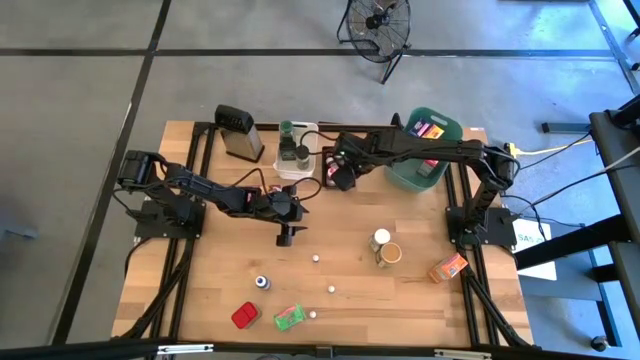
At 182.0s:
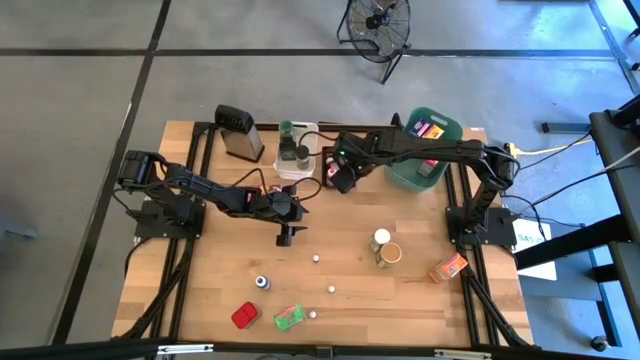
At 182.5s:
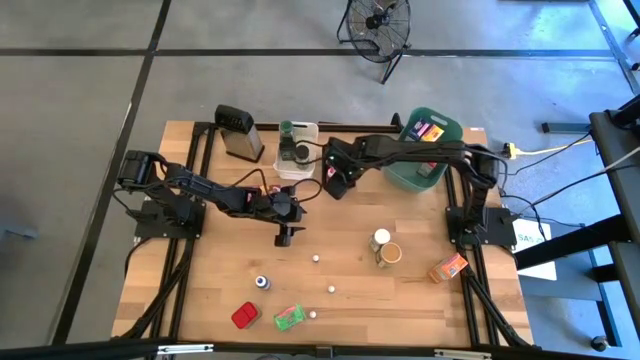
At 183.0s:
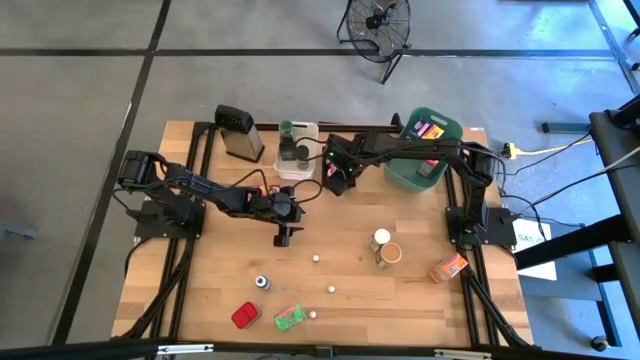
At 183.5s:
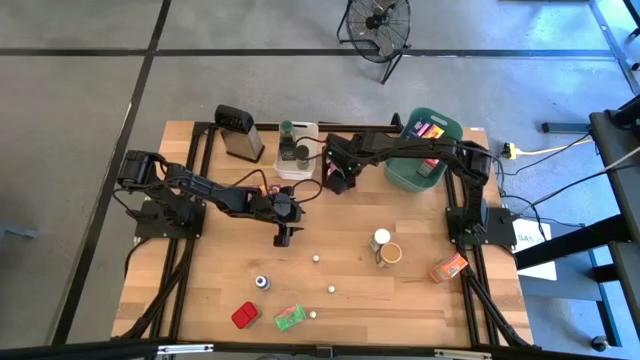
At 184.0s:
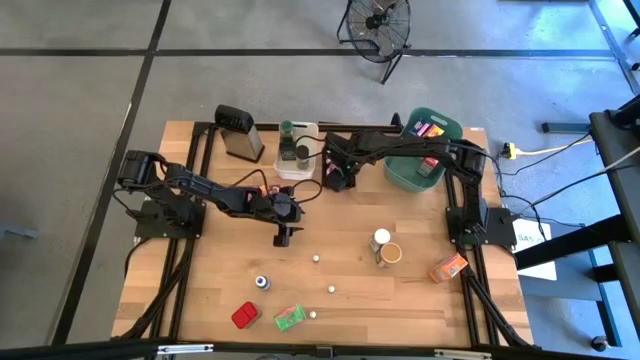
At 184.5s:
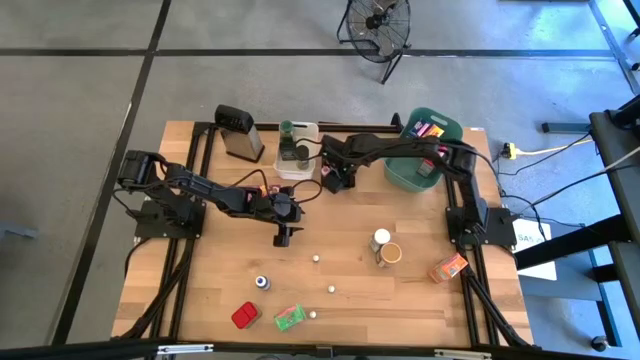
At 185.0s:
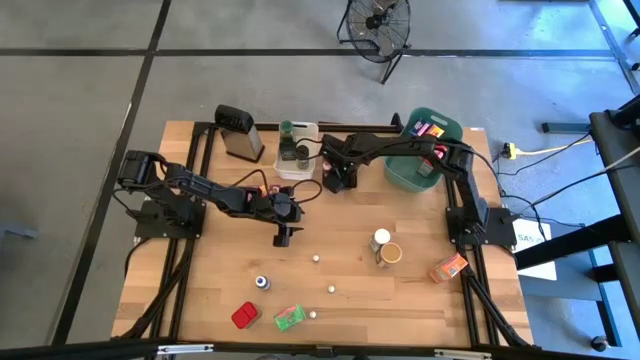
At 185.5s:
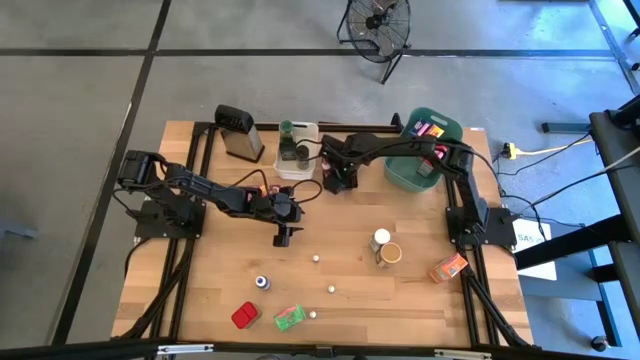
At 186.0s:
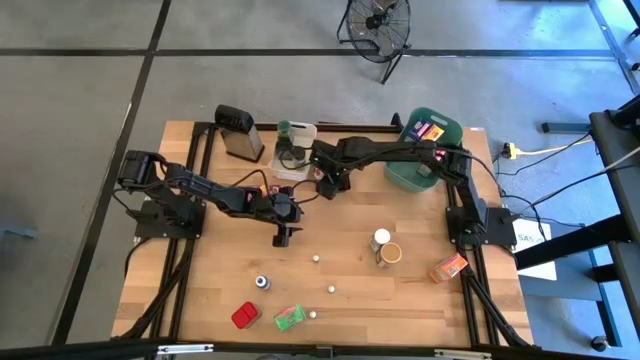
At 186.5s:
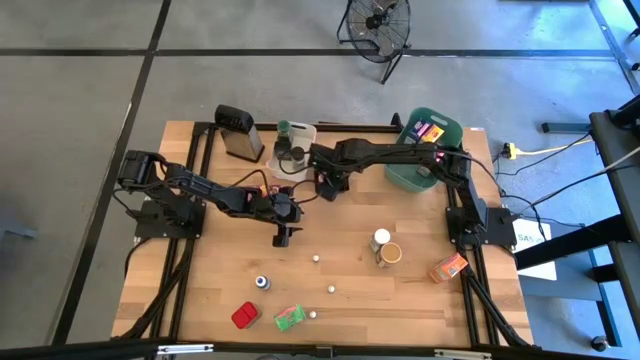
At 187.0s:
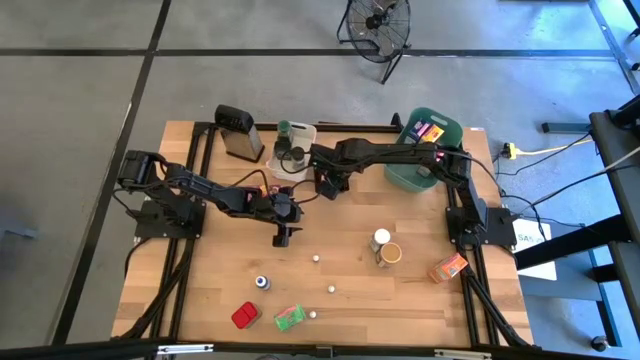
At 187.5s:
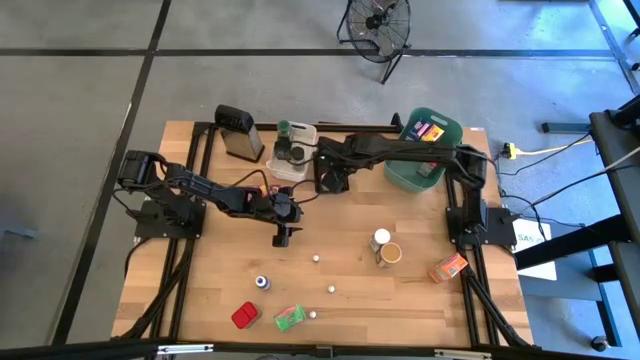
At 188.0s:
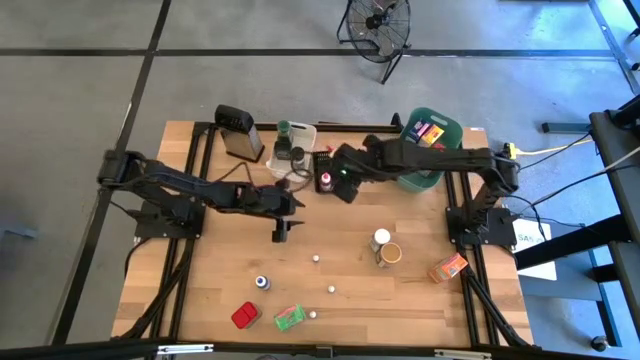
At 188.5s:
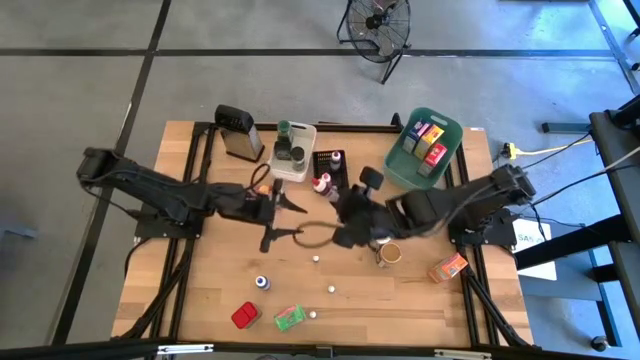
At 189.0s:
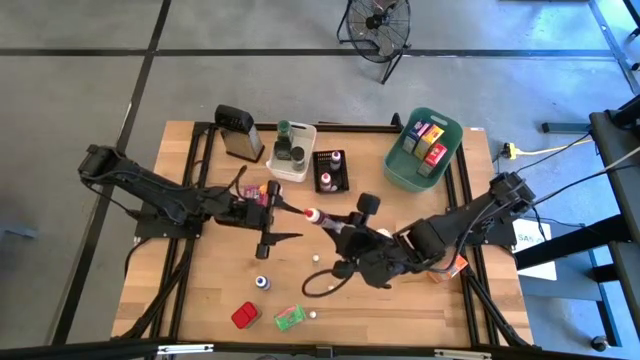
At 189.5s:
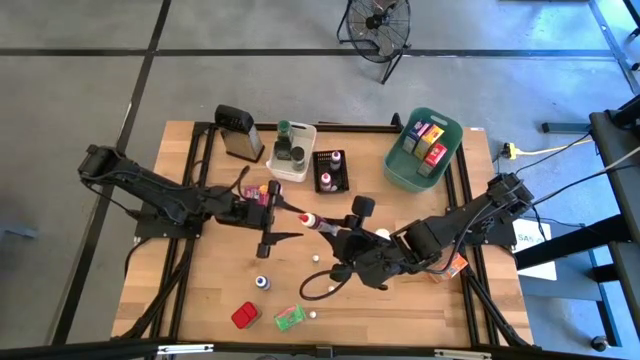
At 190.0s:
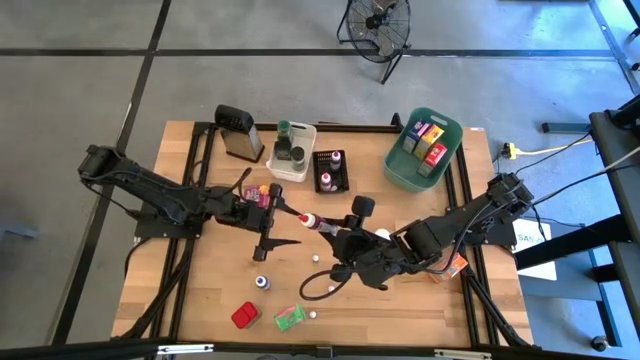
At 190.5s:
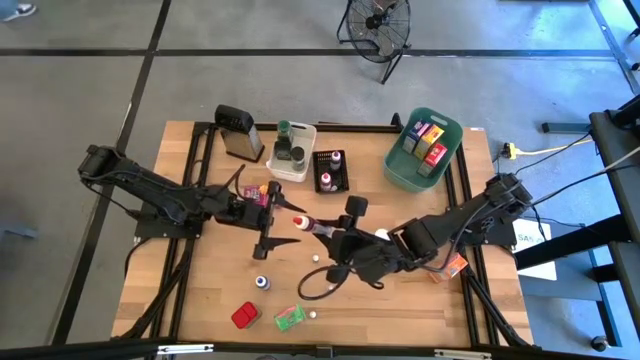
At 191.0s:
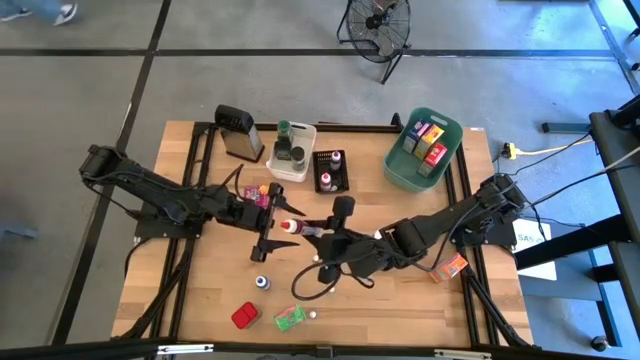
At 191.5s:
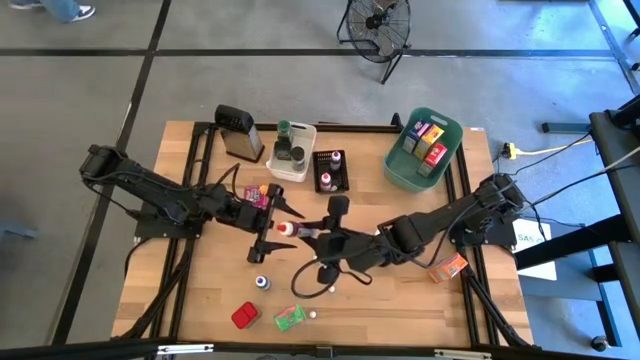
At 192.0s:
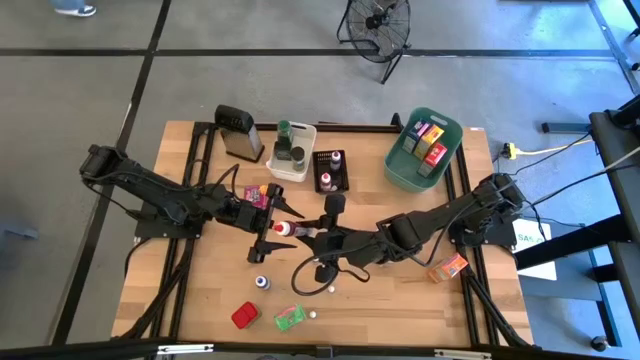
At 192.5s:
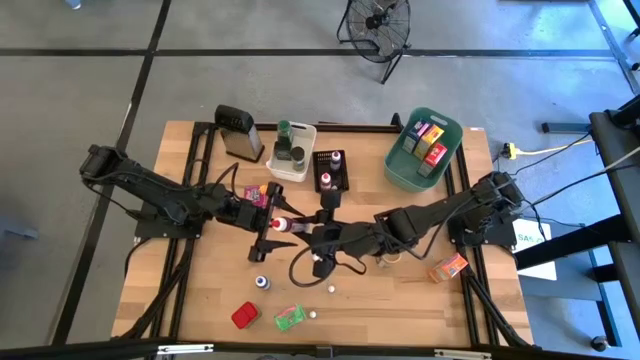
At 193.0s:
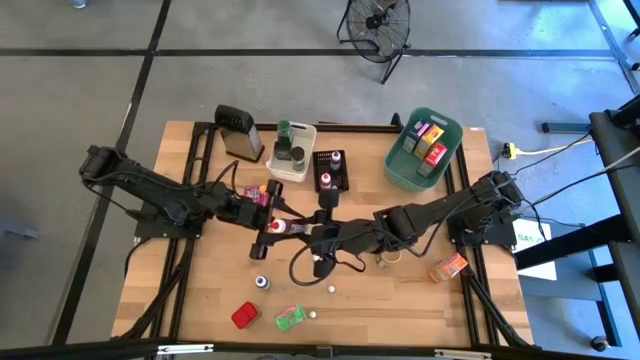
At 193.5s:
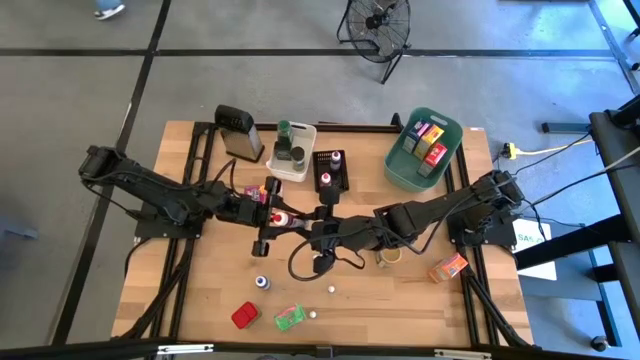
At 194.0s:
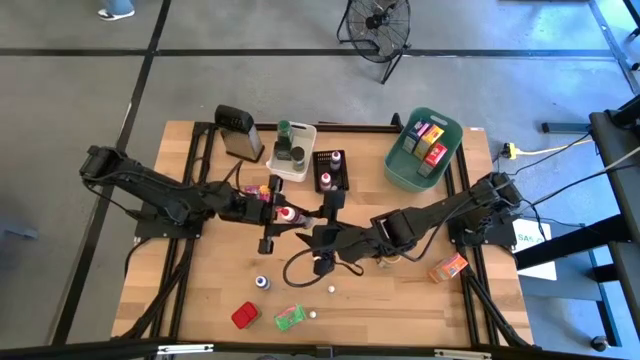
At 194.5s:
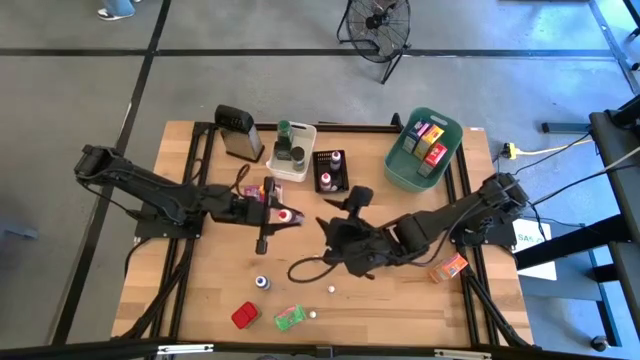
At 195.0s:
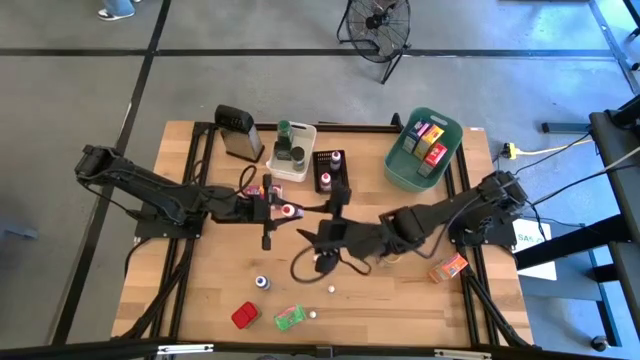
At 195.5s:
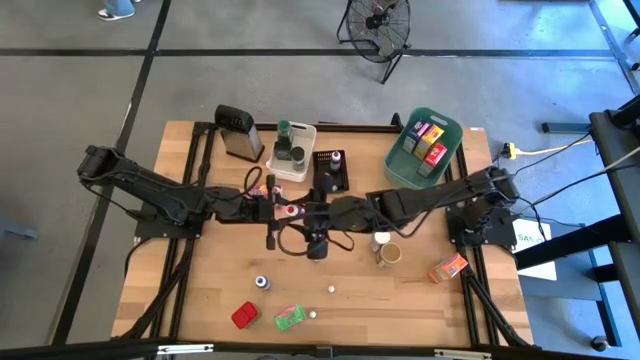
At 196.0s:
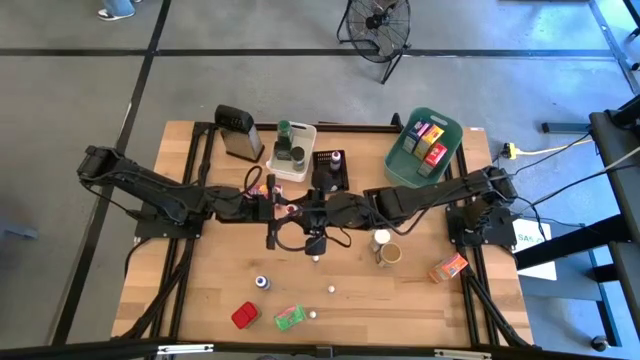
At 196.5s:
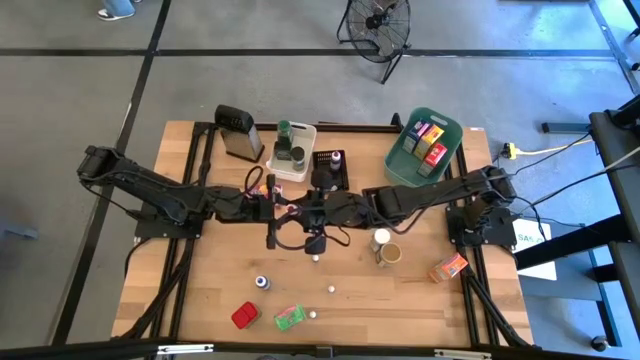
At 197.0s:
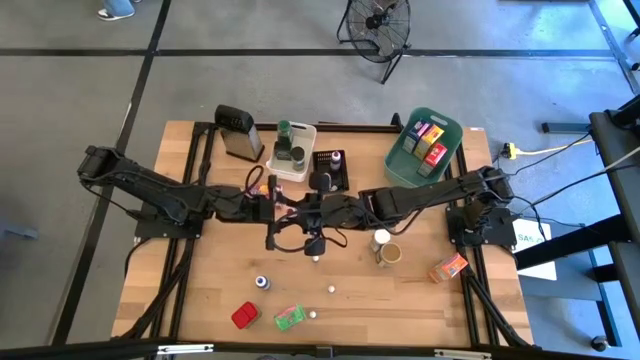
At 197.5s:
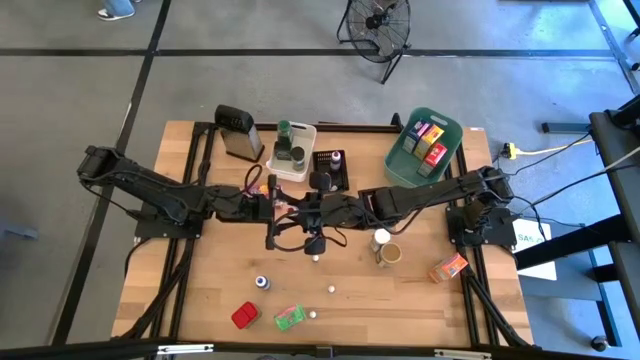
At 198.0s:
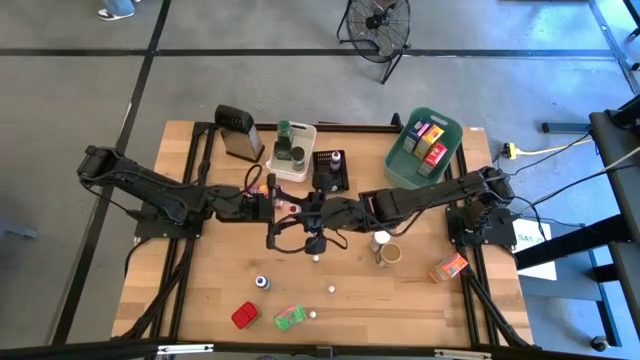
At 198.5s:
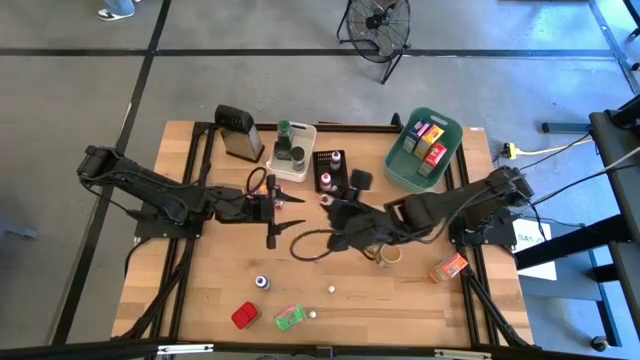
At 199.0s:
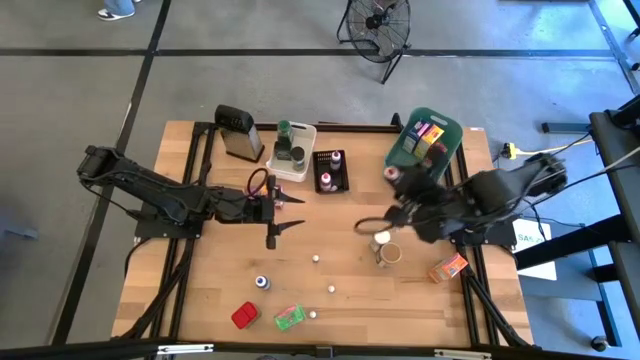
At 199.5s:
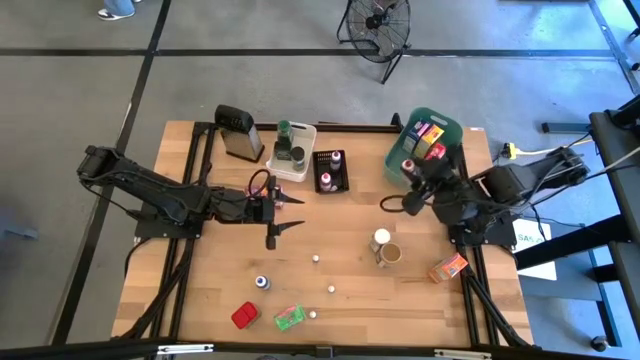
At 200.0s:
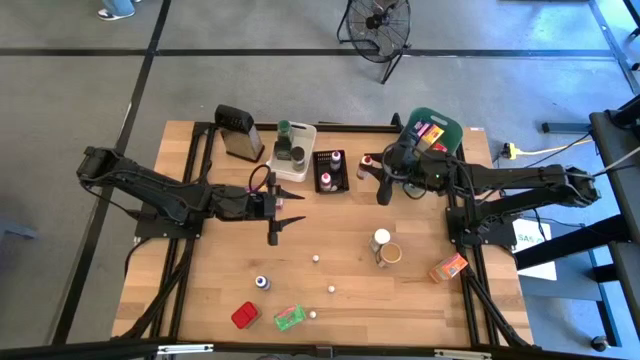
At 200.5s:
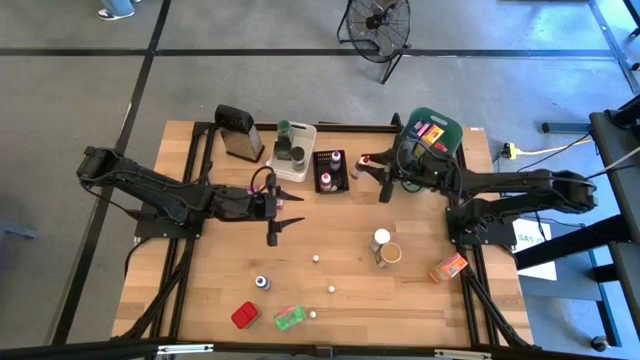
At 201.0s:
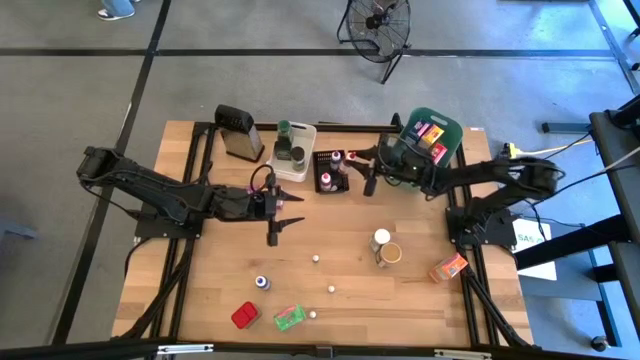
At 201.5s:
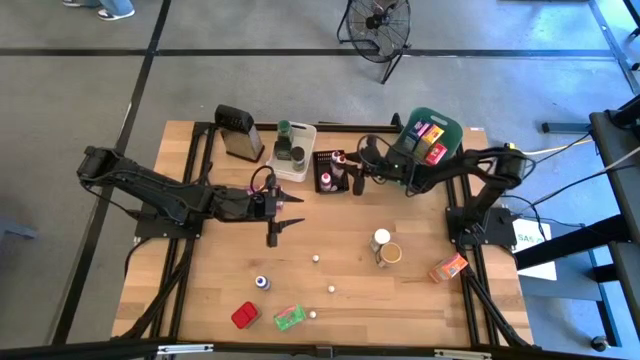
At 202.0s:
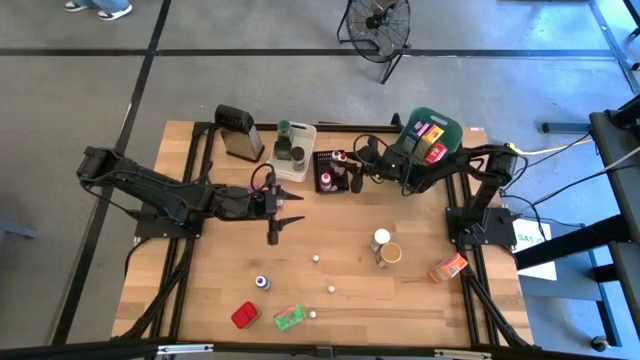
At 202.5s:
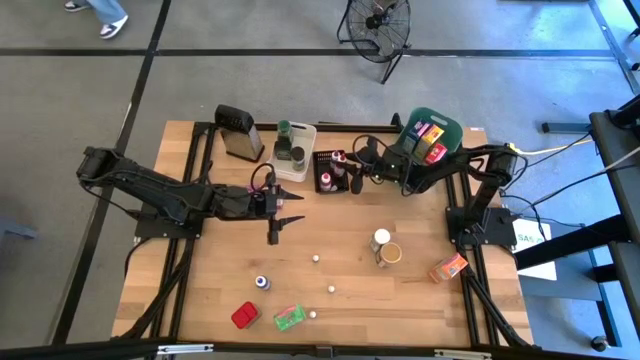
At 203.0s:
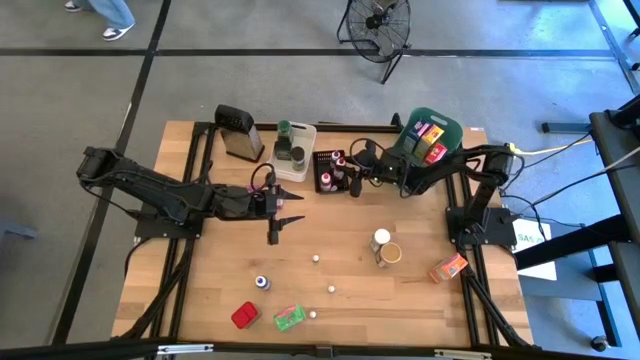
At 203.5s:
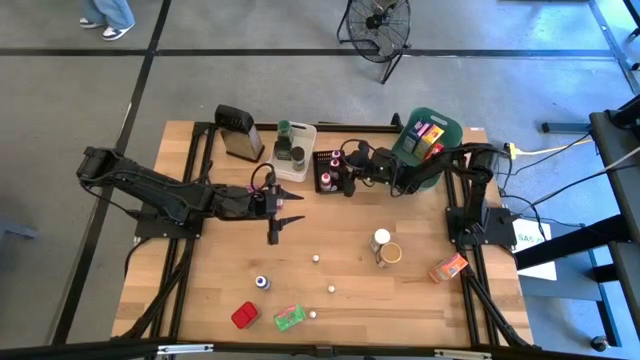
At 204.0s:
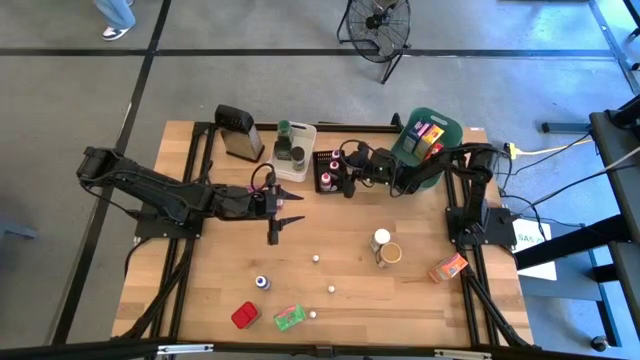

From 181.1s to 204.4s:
Task: Pick & Place Kitchen Items
Put the large red food coloring bottle into the black bin
